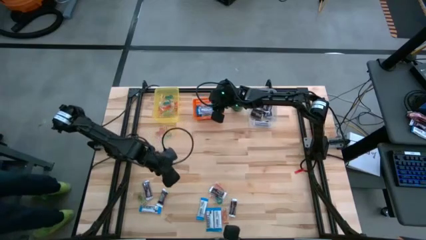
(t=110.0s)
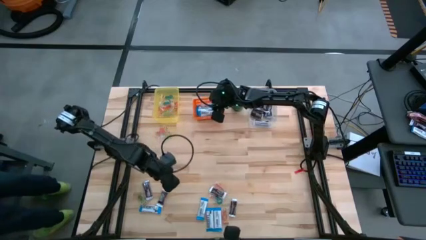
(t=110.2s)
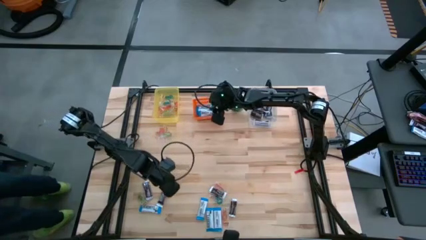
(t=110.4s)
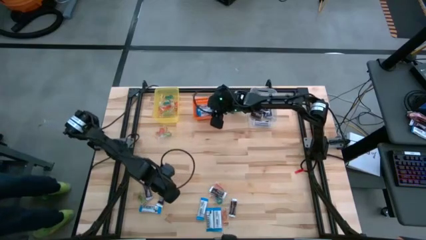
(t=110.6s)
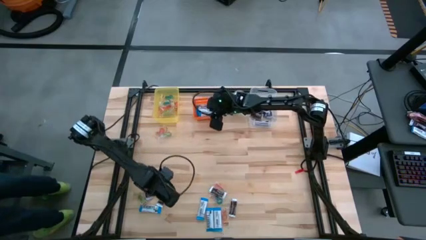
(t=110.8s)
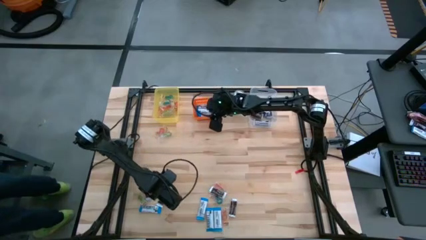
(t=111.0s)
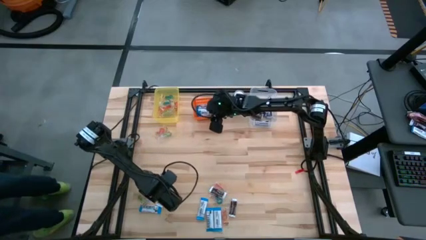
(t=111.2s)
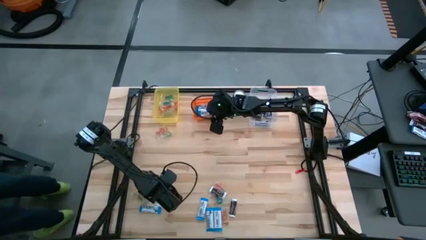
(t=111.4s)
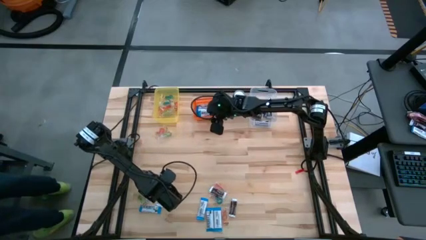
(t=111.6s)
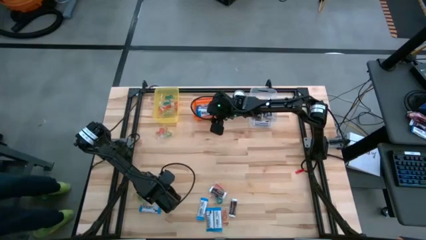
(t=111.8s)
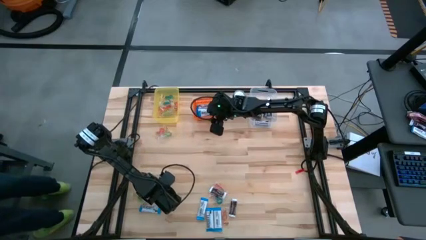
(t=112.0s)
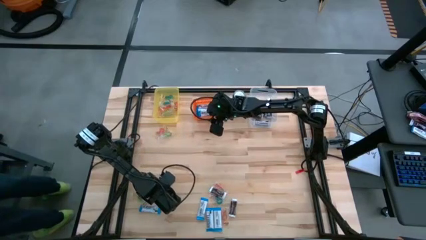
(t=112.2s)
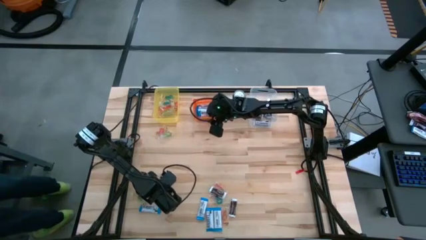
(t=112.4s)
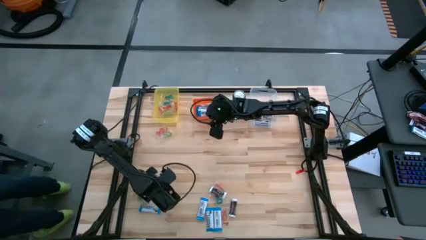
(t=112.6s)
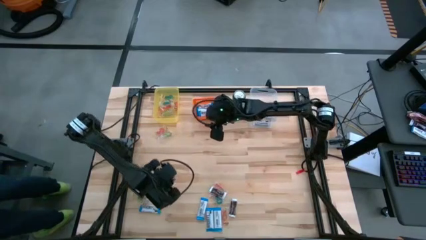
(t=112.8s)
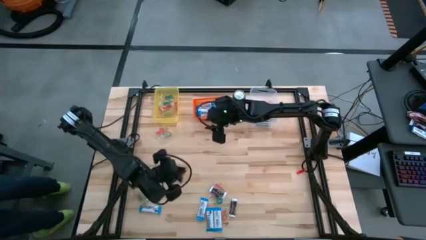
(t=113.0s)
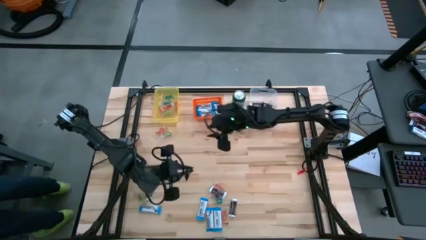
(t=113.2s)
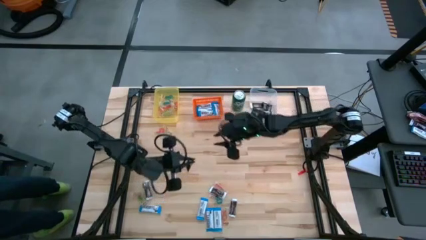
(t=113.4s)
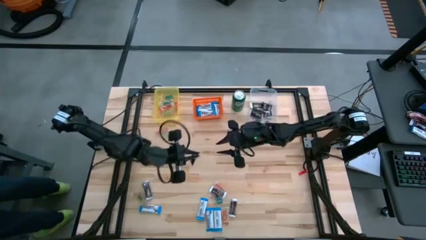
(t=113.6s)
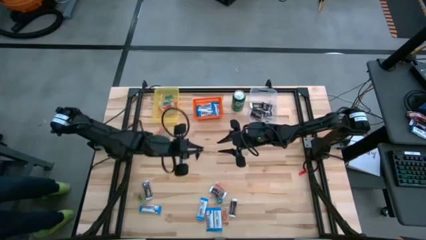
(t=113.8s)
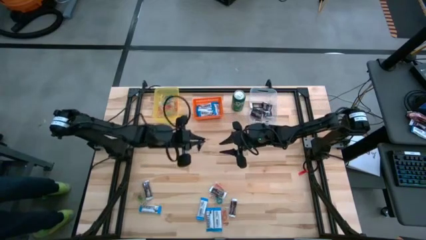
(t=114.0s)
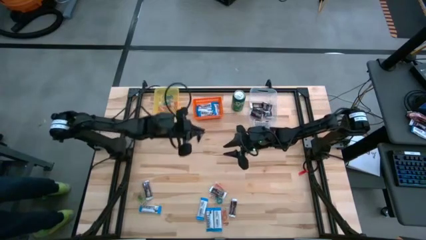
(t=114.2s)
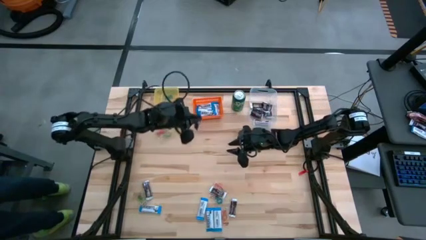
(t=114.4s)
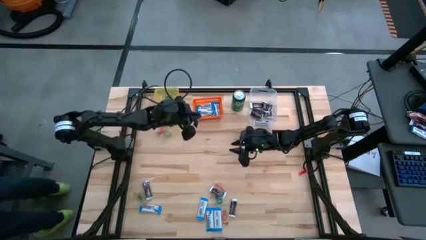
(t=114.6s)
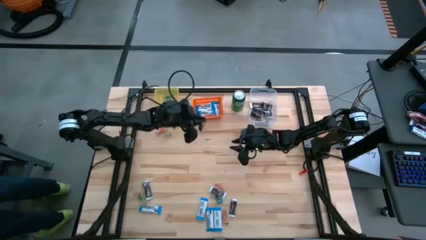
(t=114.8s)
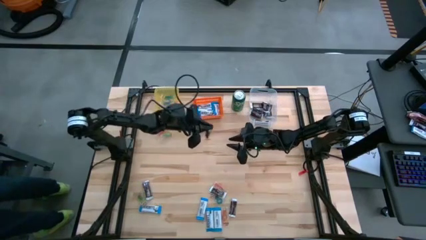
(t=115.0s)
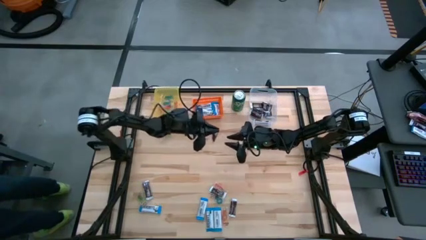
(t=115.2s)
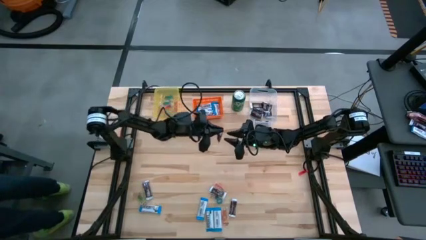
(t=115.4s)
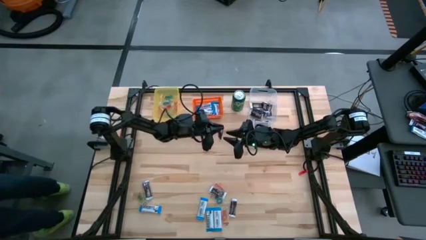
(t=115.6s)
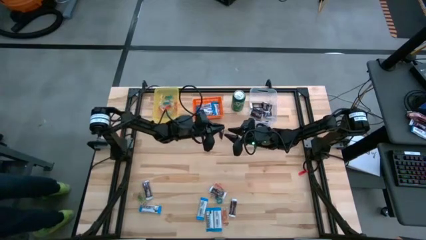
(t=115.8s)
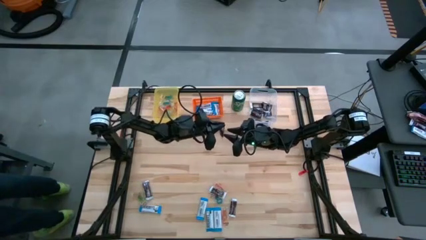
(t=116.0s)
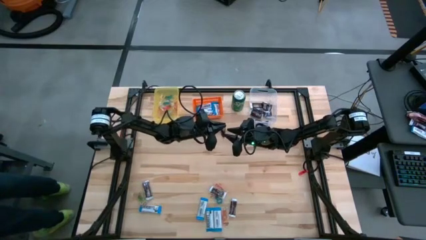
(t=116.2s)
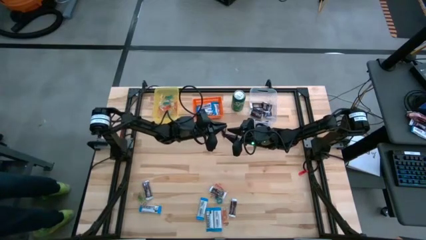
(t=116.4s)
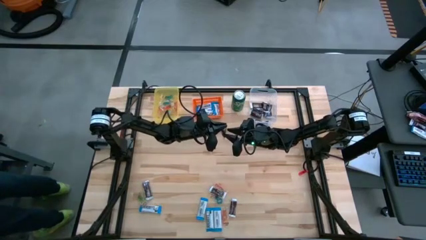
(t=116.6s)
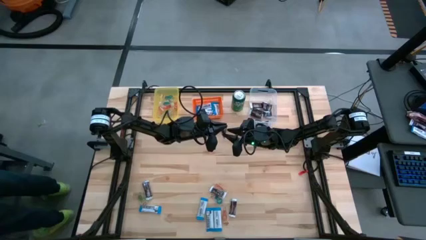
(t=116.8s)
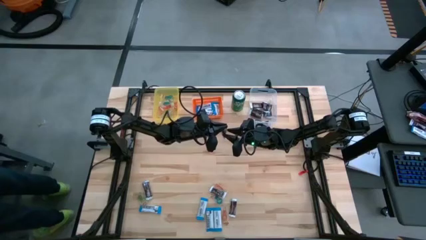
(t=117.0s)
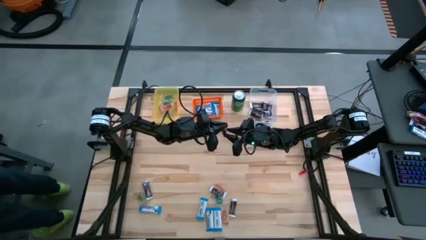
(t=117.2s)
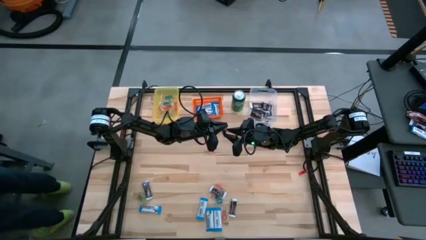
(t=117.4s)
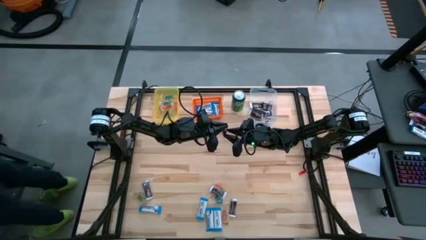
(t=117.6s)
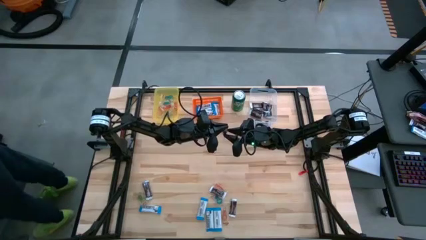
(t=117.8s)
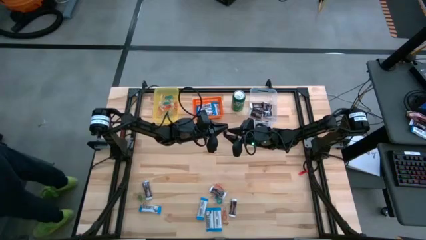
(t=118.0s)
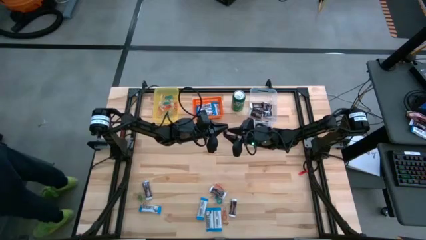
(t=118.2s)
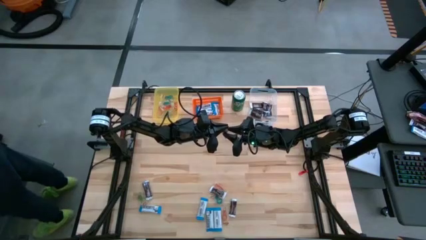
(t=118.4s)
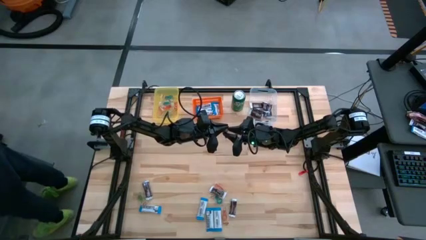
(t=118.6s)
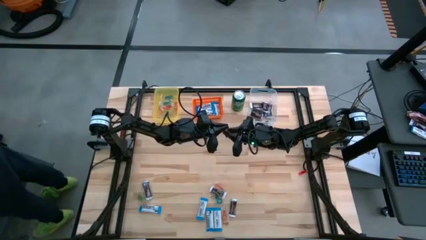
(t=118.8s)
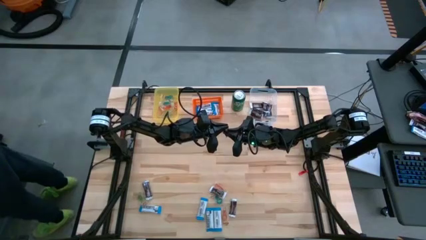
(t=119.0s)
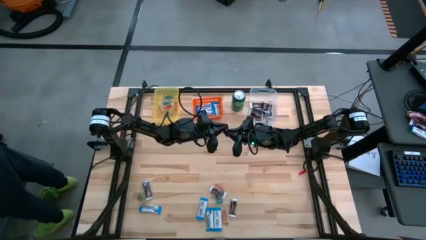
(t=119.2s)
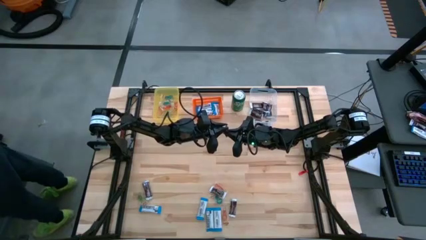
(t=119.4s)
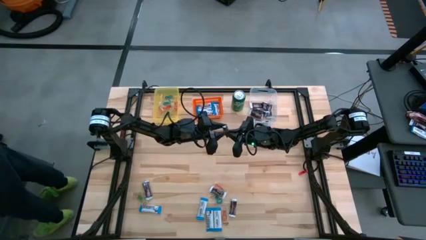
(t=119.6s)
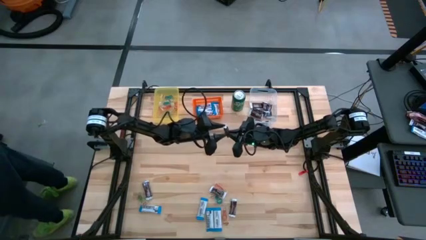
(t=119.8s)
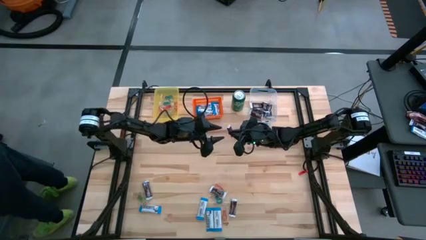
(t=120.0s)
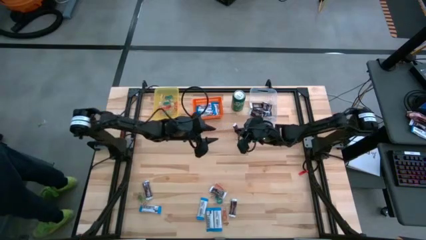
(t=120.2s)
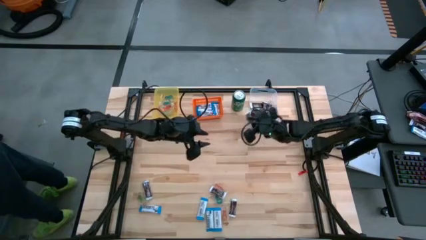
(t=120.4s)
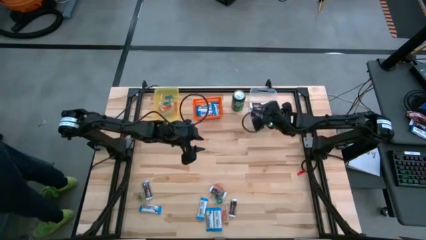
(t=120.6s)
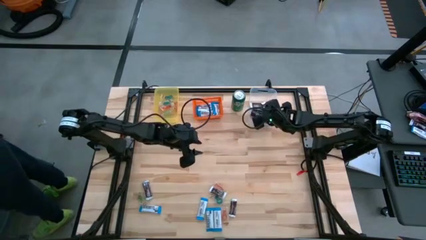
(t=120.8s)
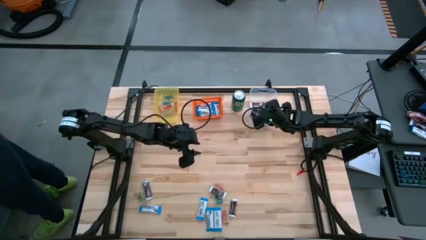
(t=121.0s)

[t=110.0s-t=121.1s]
Task: Organize candy in baskets
Put the brown chocolate into the transparent bin

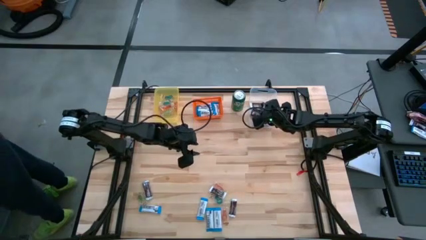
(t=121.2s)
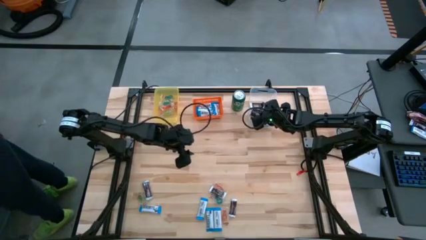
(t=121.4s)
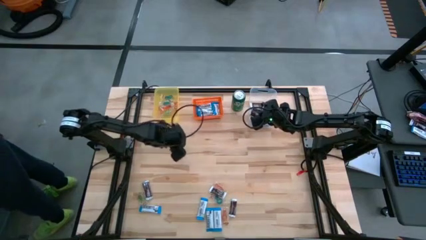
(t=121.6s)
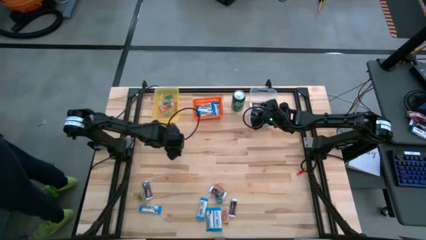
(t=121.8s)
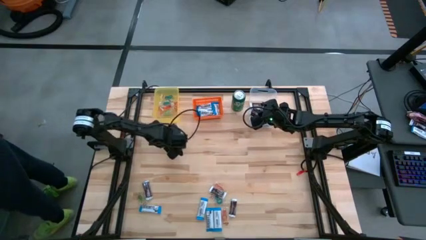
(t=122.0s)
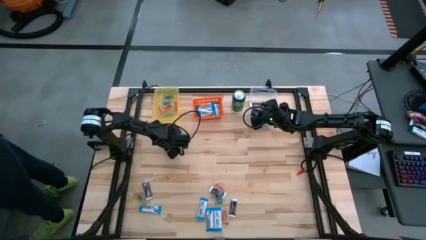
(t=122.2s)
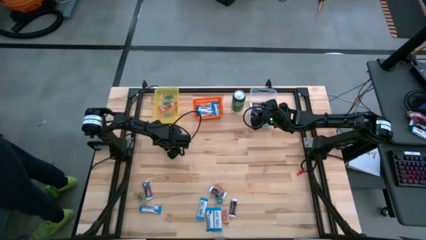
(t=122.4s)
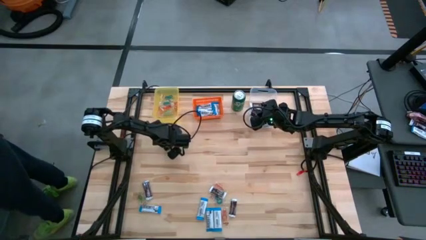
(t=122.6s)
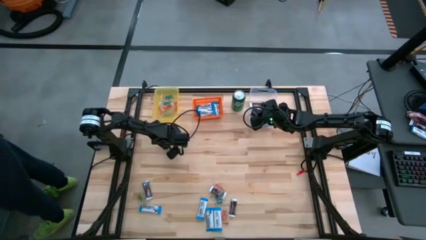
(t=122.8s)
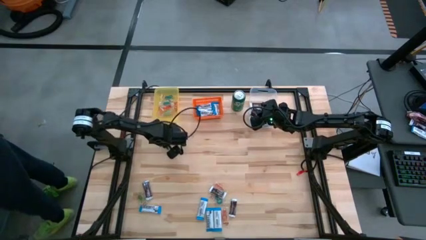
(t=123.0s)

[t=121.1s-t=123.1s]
Put the green gummy into the yellow bin

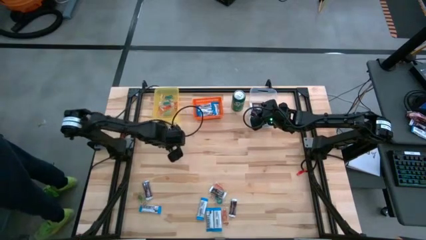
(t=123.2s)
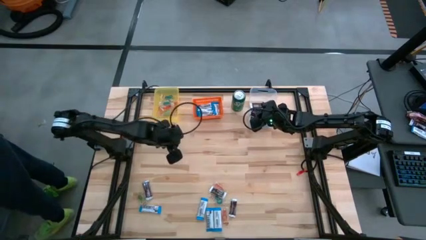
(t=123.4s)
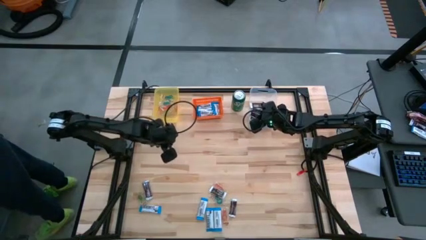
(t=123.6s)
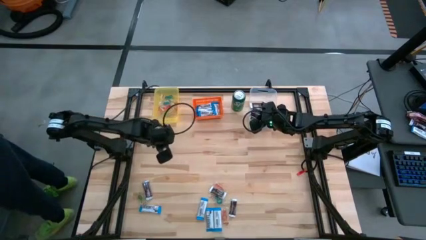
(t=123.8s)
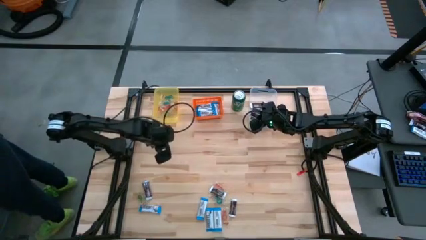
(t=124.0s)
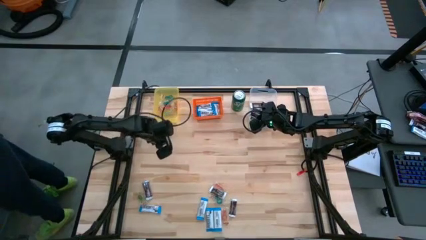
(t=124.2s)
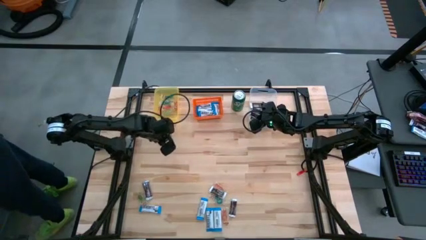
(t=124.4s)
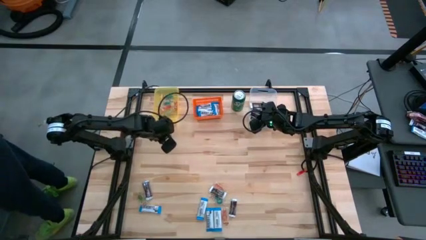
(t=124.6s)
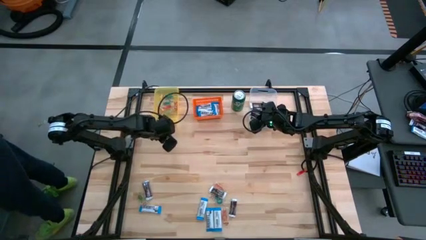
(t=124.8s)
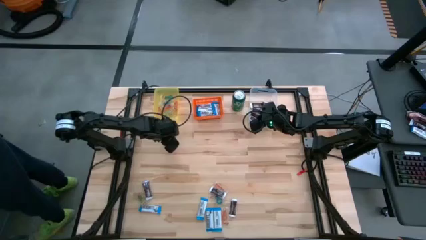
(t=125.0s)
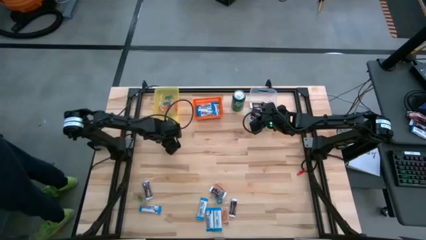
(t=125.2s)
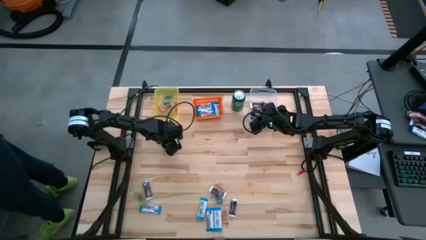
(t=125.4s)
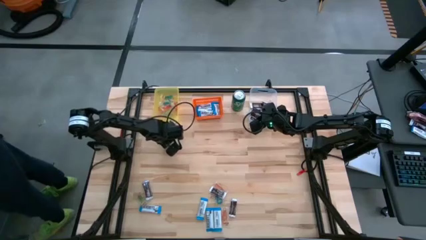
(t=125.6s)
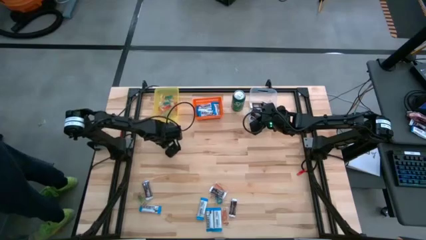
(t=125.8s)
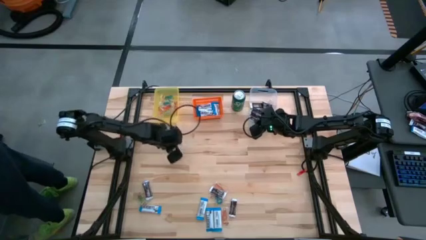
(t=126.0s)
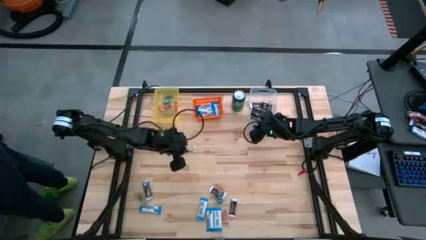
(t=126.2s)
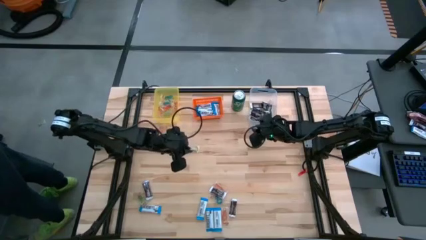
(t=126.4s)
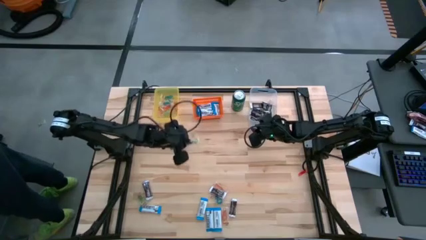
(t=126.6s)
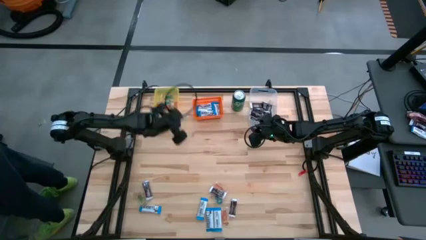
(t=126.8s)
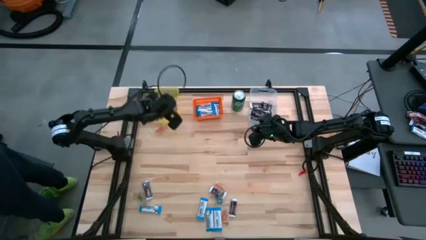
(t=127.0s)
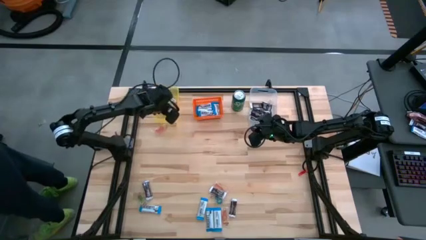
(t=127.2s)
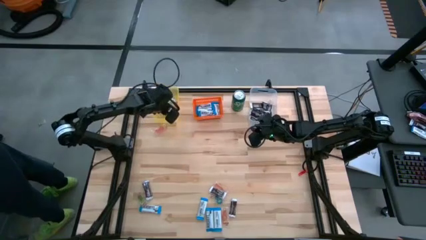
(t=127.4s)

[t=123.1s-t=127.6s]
Put the green gummy into the yellow bin
